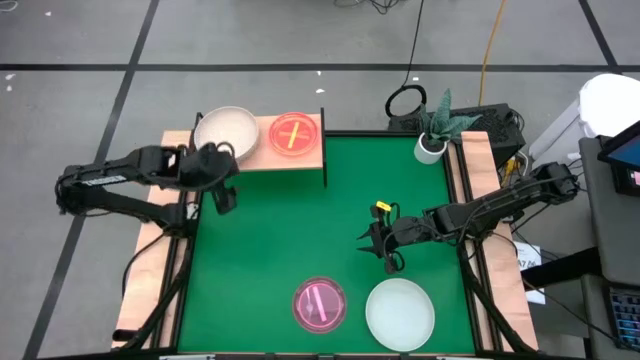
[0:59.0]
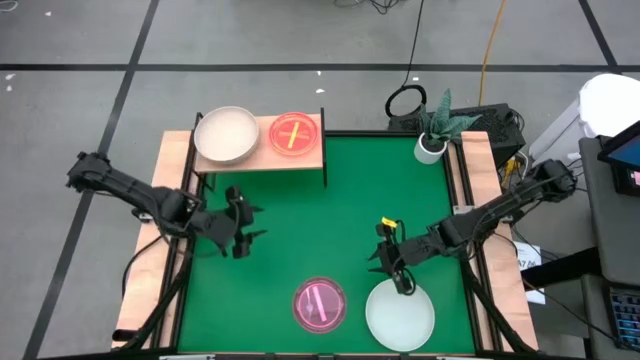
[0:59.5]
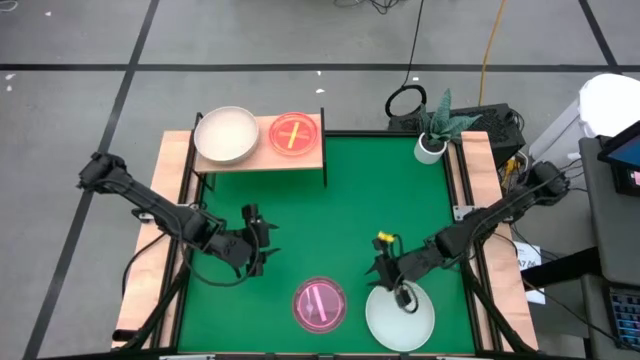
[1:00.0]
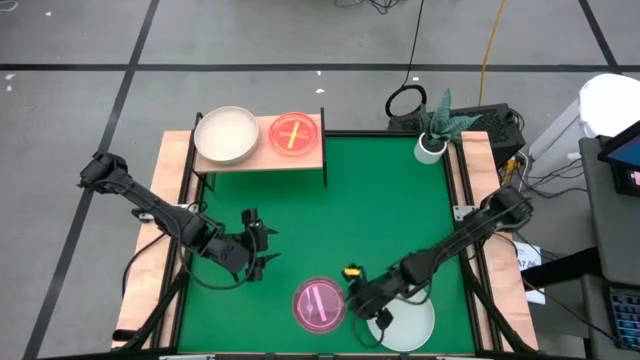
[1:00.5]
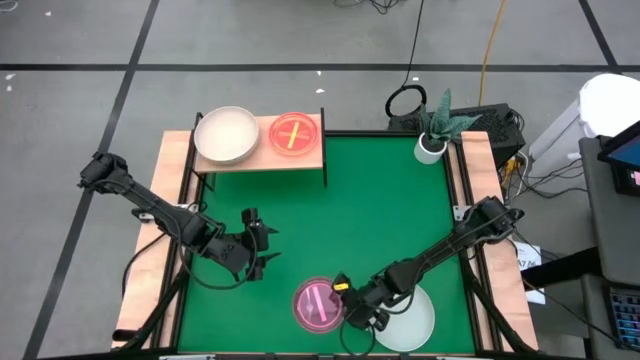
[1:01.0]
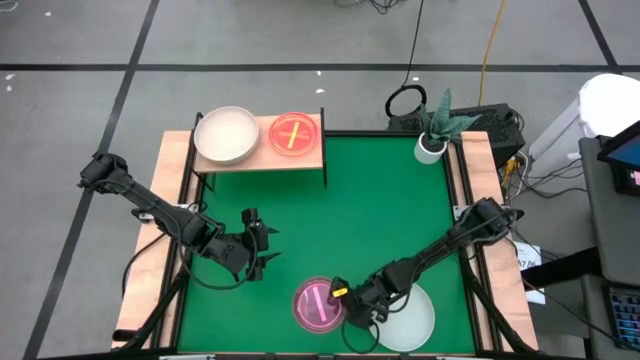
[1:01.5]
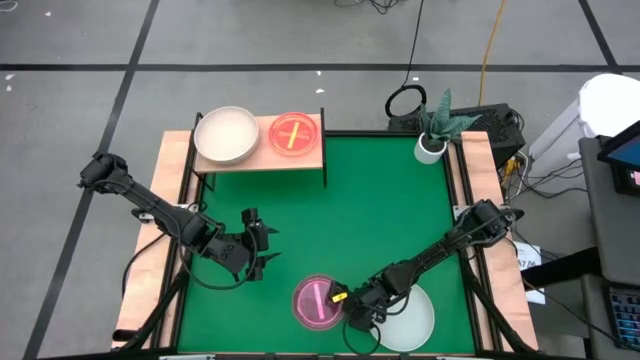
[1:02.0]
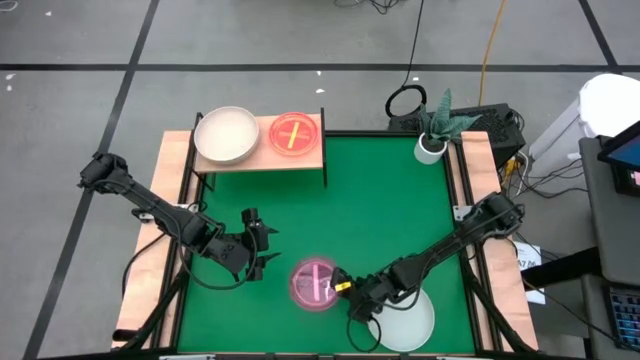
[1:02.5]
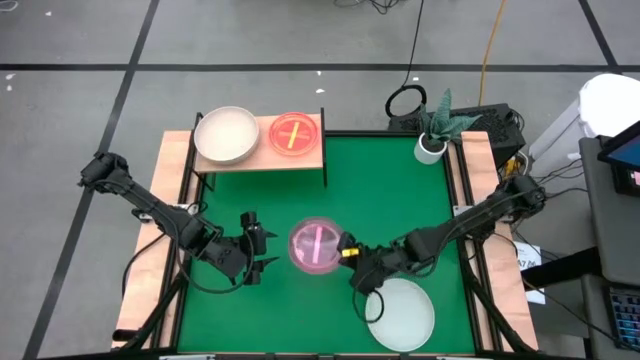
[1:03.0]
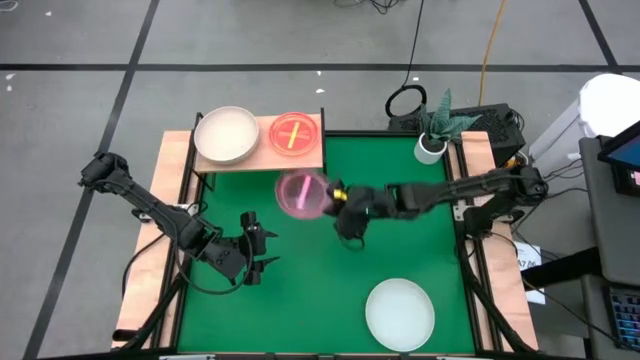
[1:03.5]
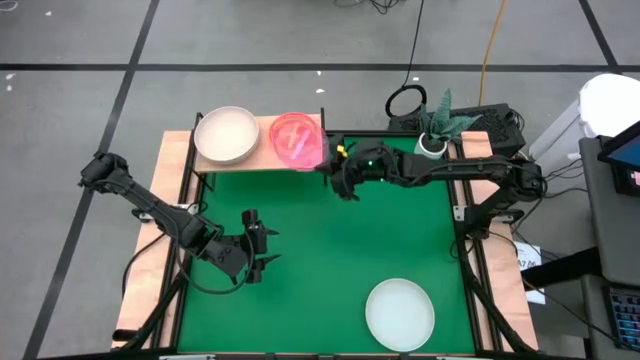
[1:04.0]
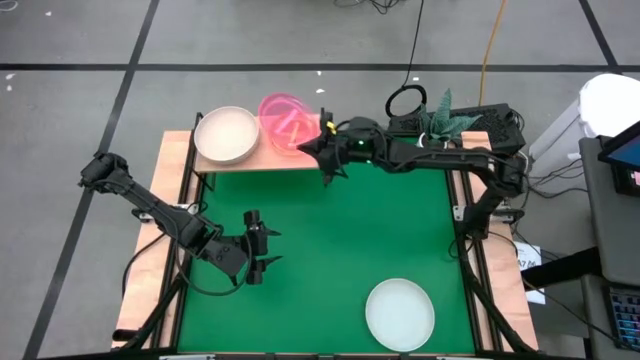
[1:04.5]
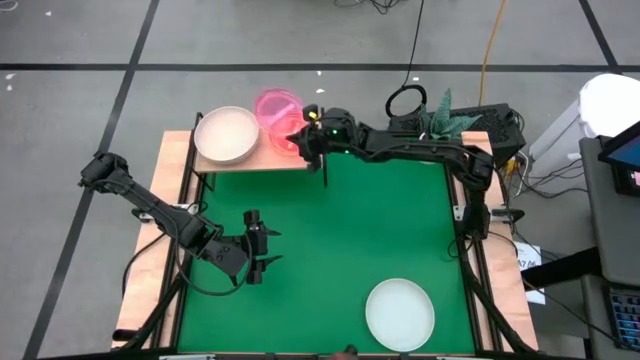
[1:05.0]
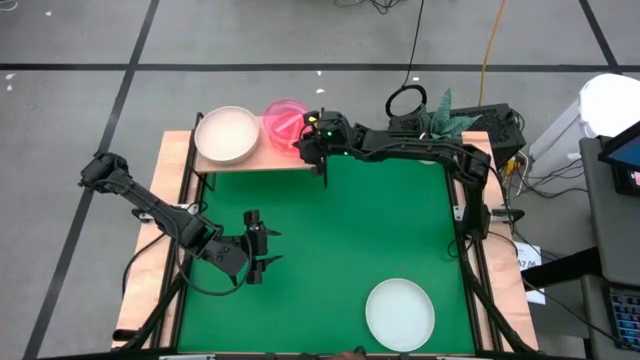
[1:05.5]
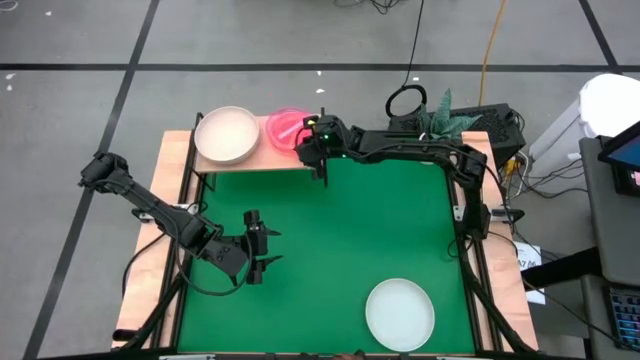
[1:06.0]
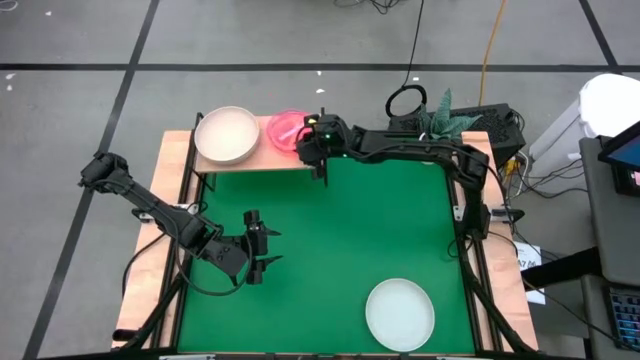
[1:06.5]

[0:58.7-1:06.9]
Task: Place and stack plates onto a shelf
Stack the pink plate on top of the orange plate on the shelf

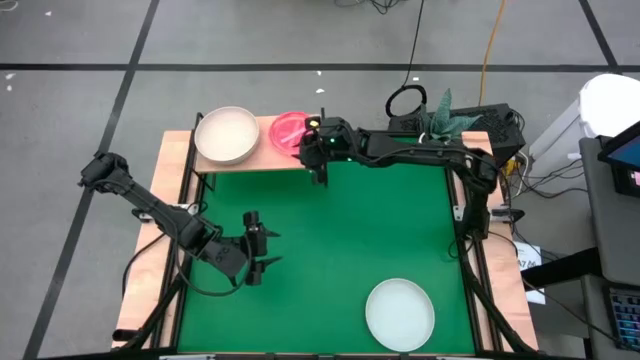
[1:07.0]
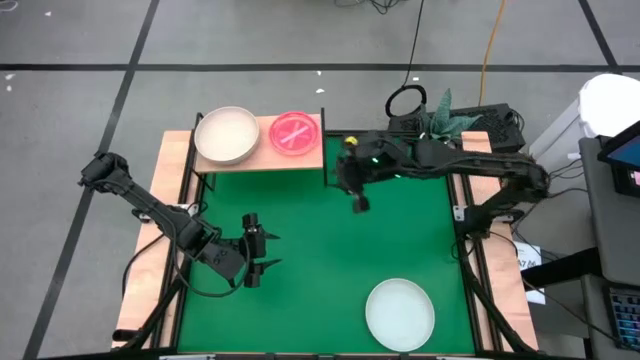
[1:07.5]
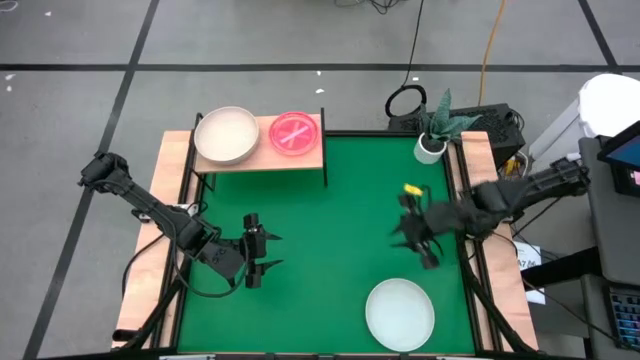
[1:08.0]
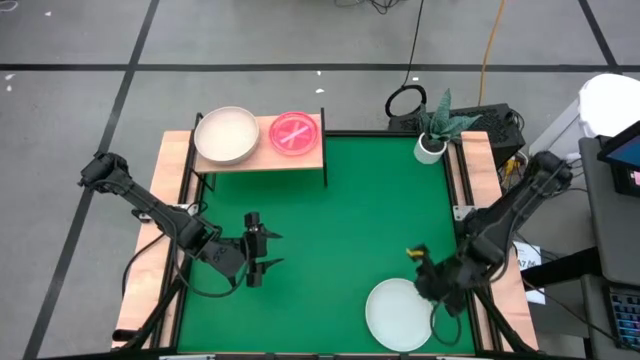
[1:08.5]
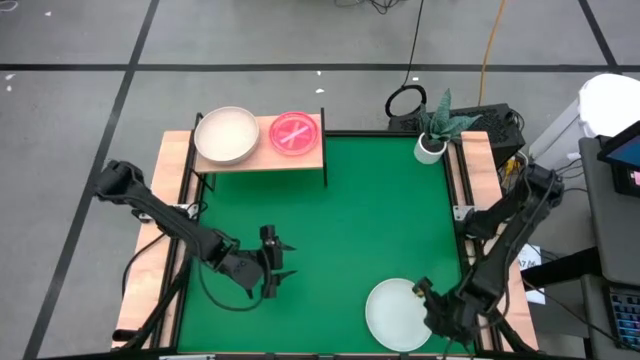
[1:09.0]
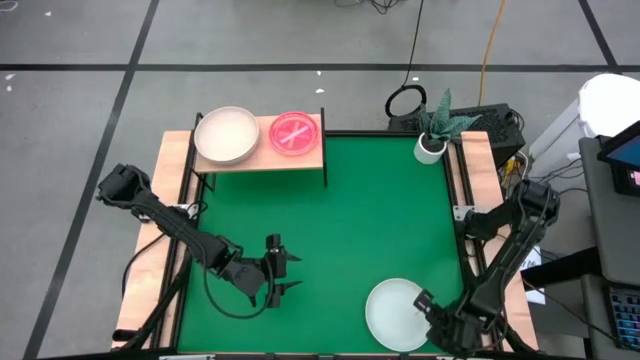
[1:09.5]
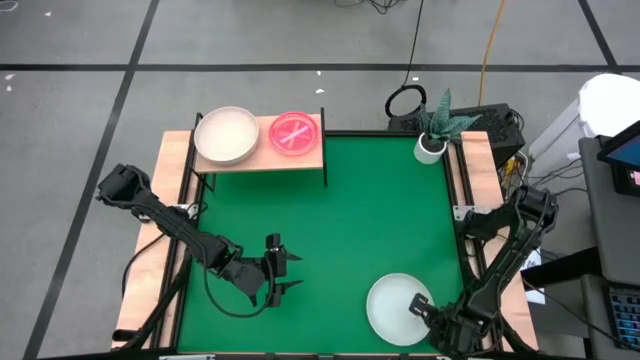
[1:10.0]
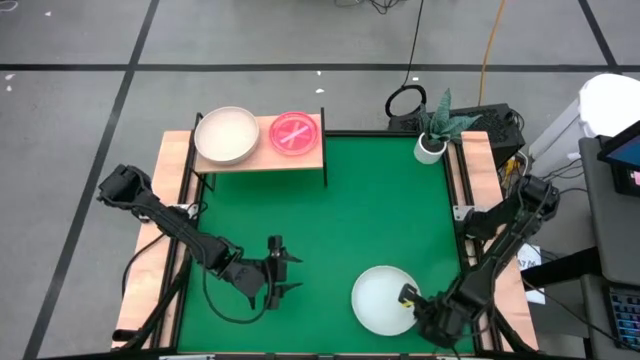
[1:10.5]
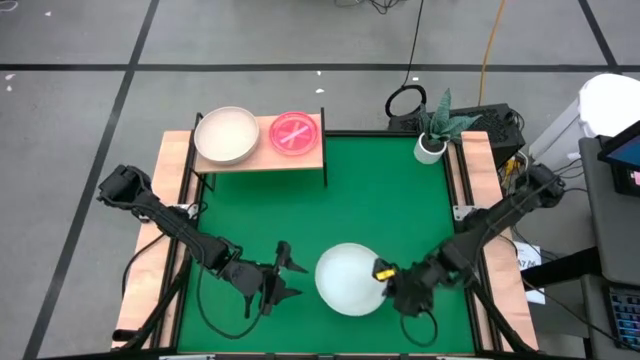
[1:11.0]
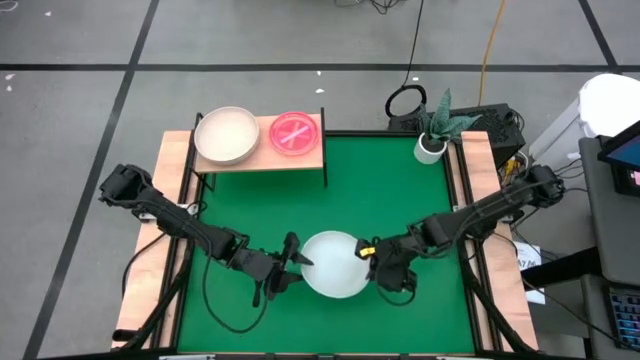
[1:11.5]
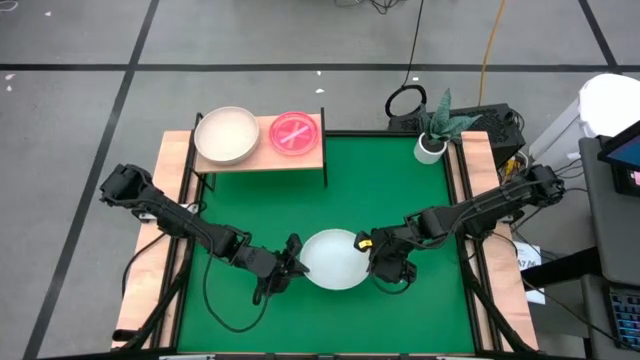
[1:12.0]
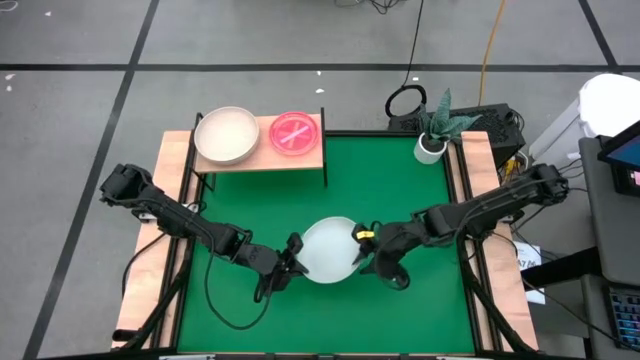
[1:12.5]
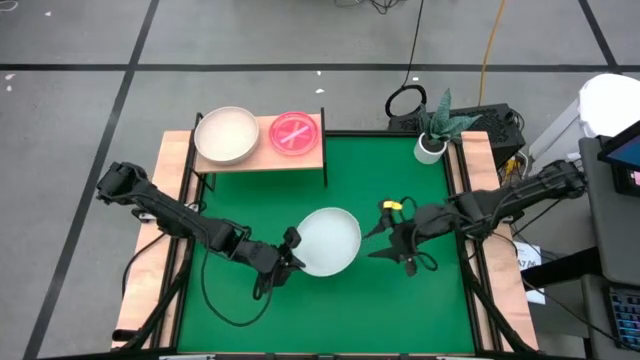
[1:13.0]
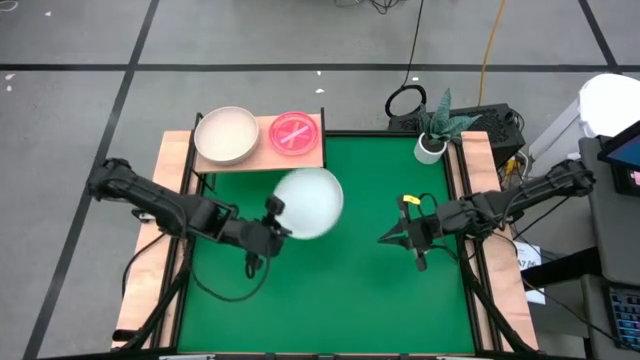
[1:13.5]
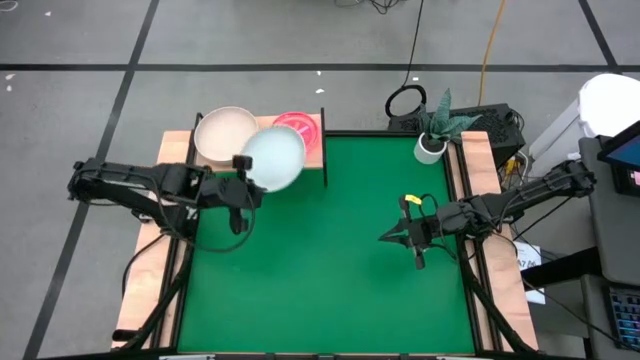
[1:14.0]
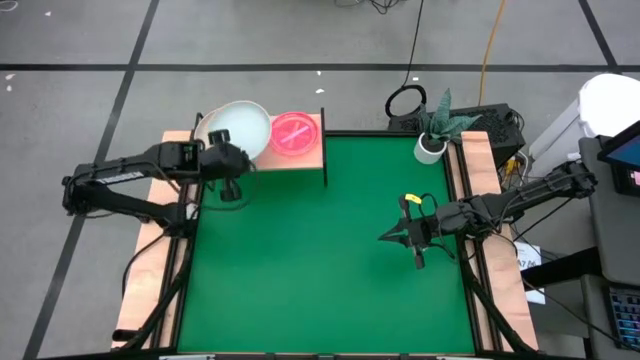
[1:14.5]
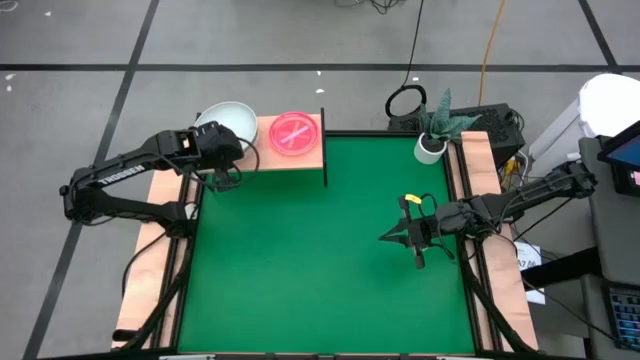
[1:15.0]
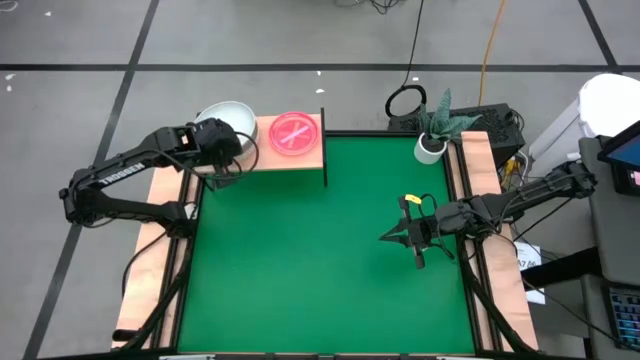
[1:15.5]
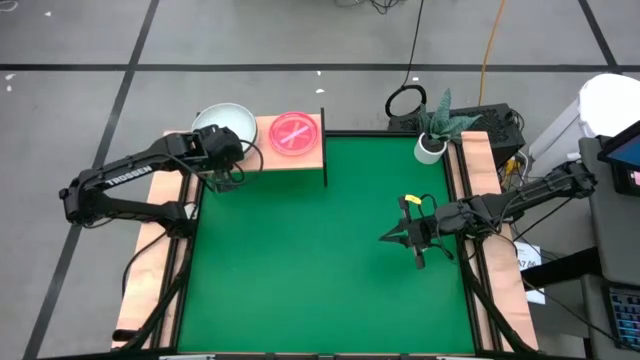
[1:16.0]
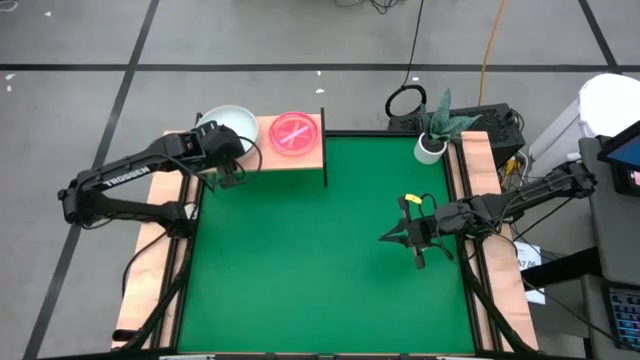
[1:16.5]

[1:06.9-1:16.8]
Stack the gray plate on top of the brown plate on the shelf

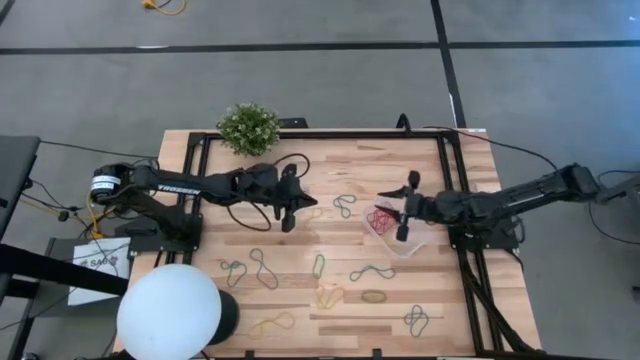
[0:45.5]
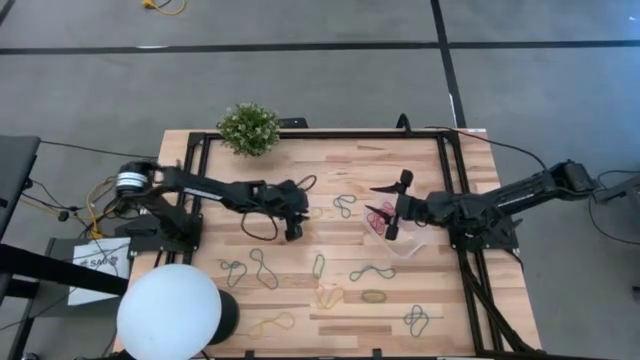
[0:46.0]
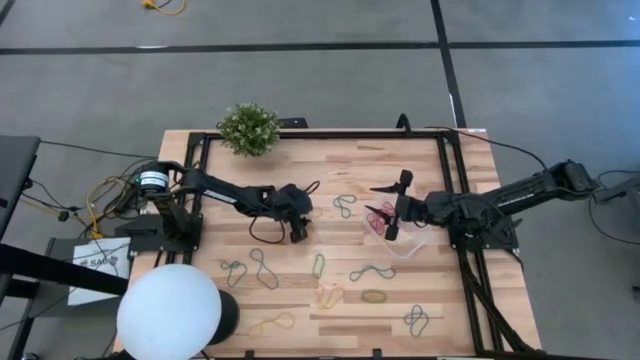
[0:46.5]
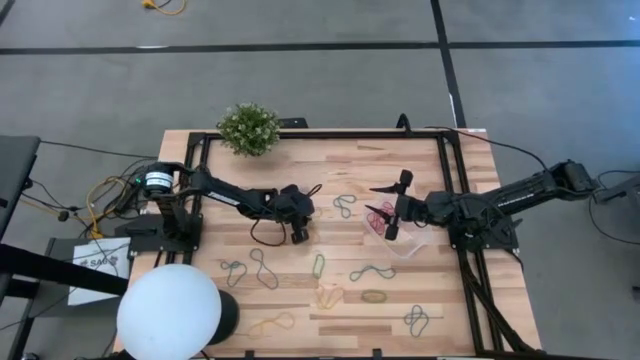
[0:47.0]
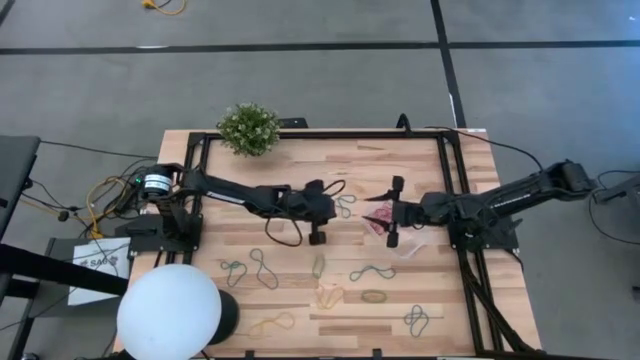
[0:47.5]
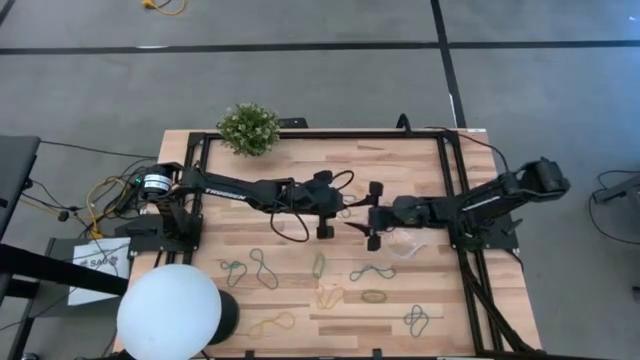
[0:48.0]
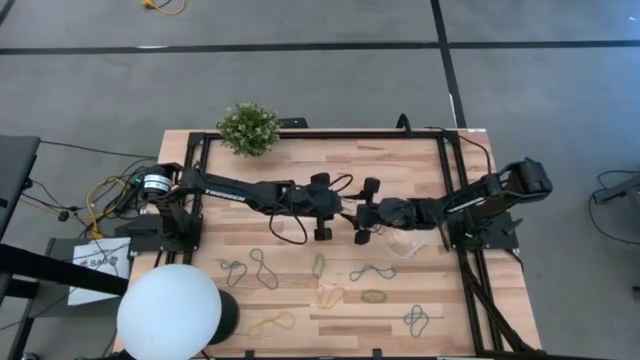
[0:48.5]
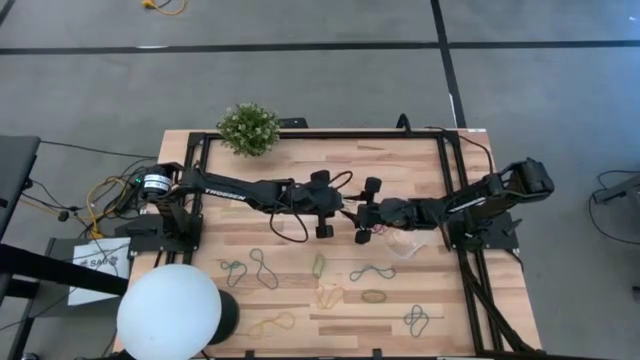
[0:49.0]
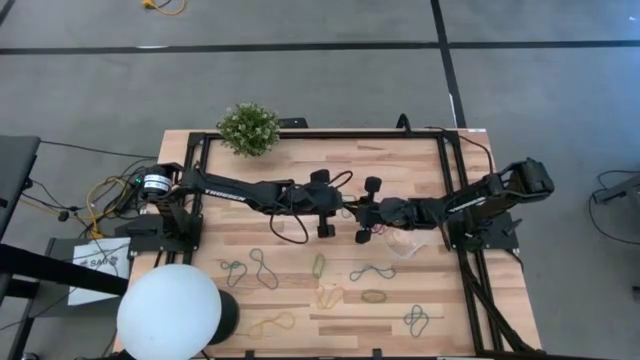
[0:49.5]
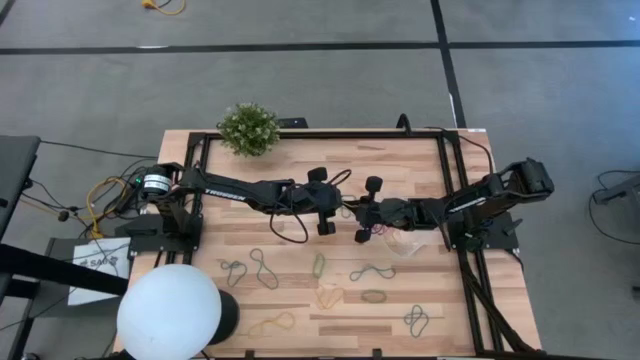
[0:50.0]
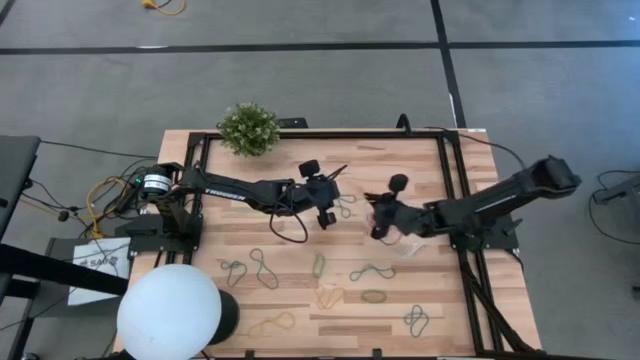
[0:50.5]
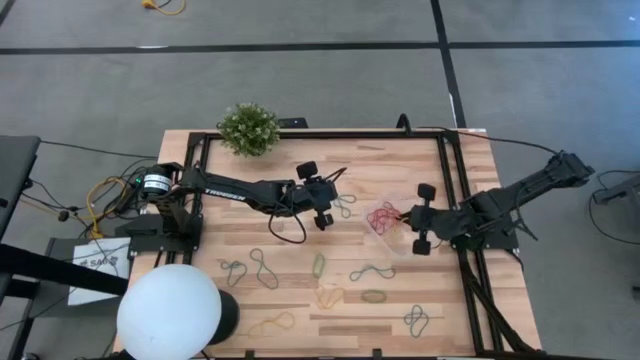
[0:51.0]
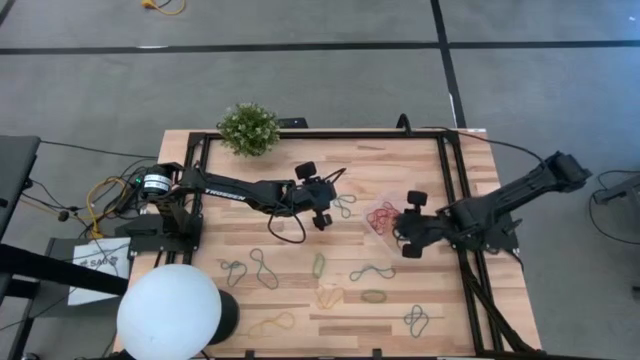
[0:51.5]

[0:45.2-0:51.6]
Task: Pick and place items into bin
Put the yellow rubber band into the transparent bin
